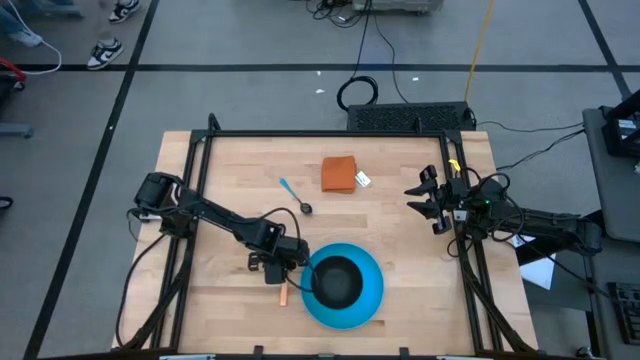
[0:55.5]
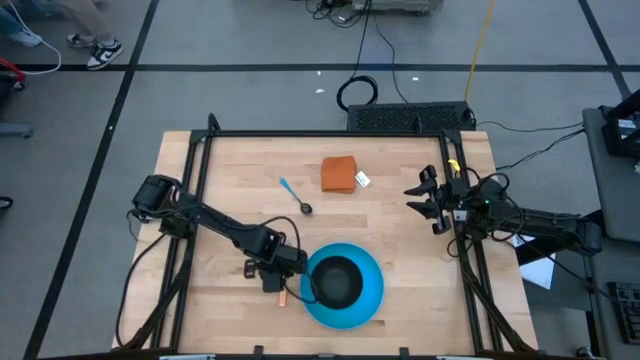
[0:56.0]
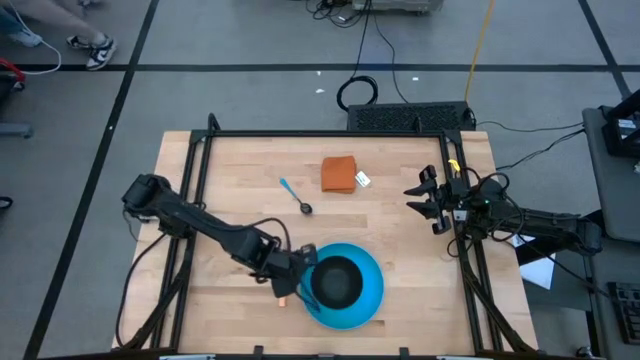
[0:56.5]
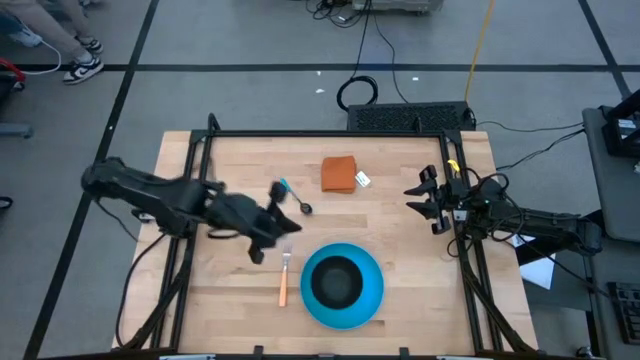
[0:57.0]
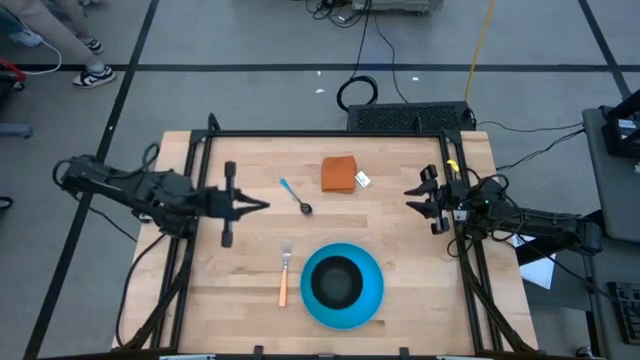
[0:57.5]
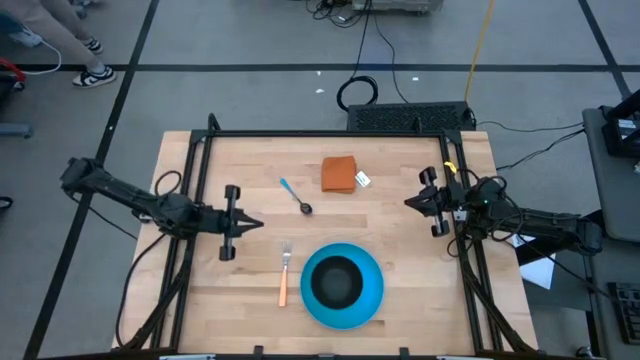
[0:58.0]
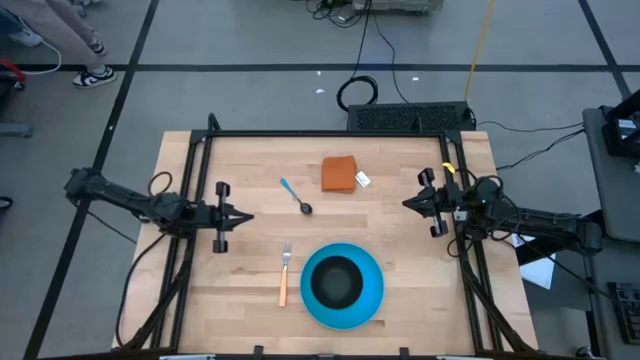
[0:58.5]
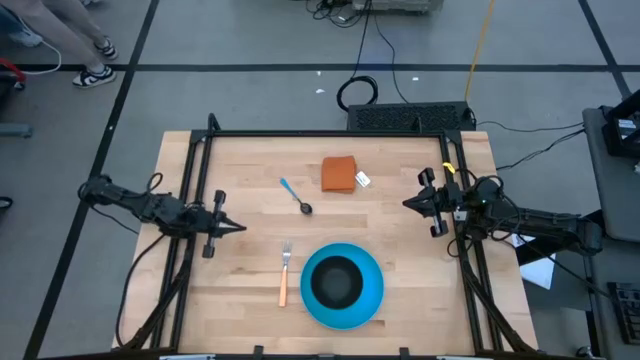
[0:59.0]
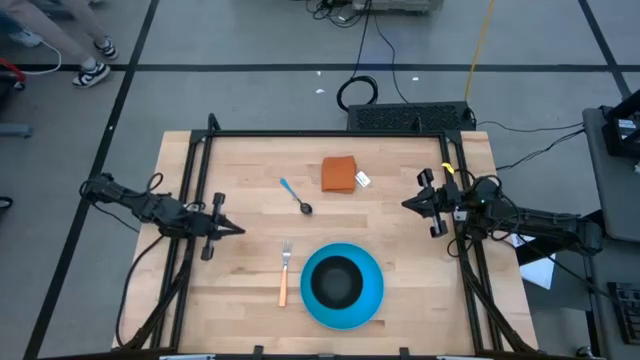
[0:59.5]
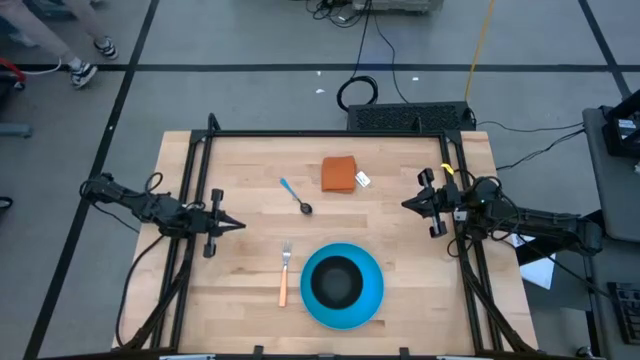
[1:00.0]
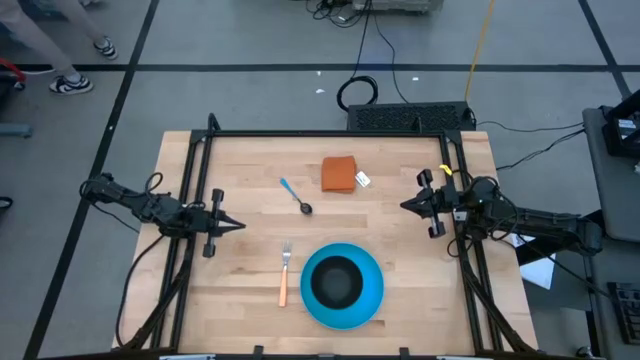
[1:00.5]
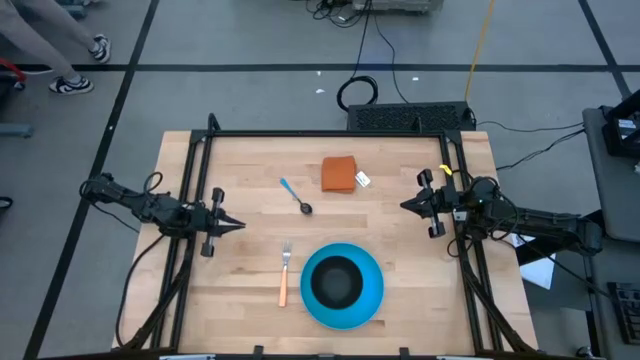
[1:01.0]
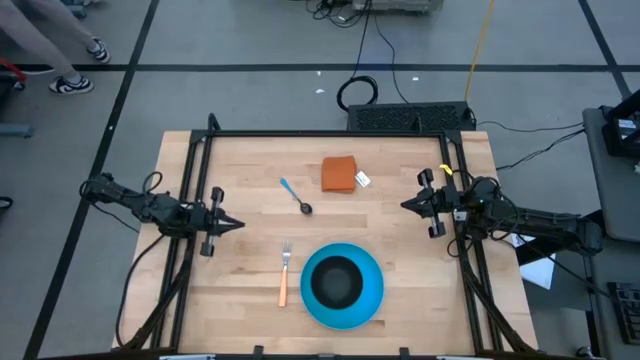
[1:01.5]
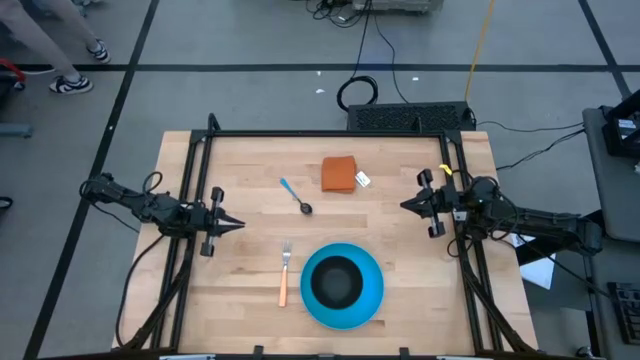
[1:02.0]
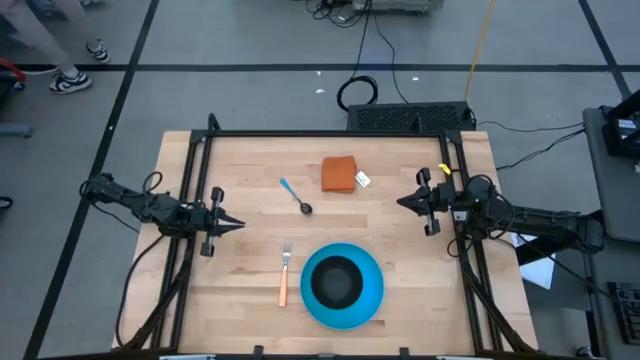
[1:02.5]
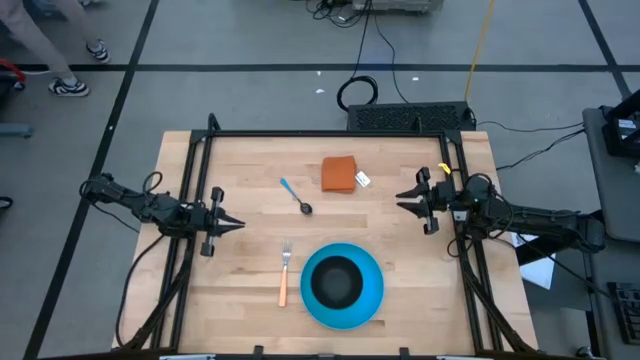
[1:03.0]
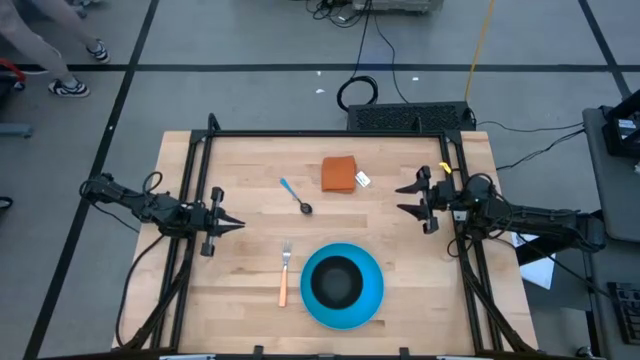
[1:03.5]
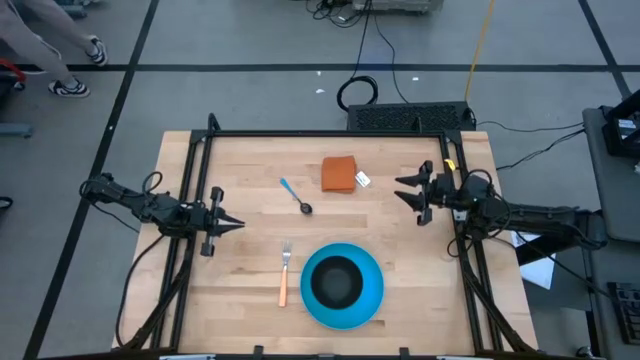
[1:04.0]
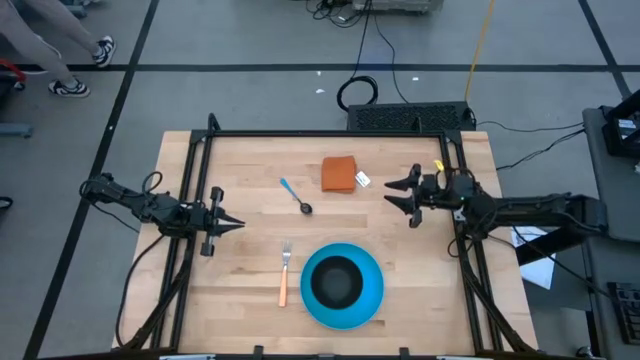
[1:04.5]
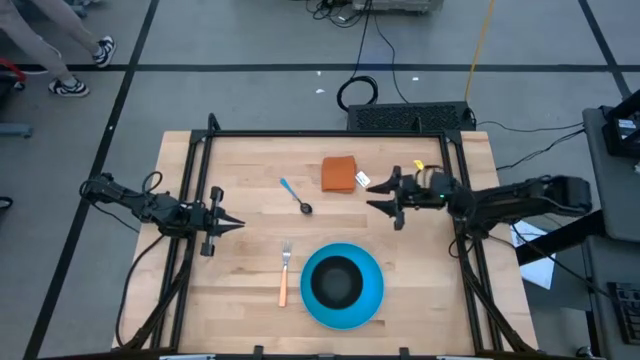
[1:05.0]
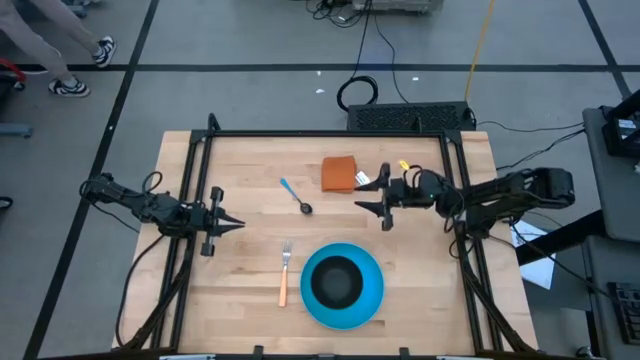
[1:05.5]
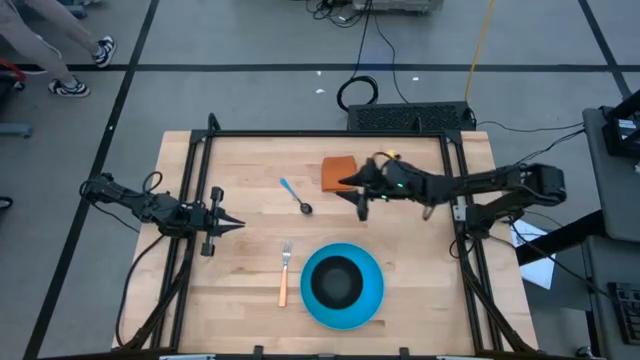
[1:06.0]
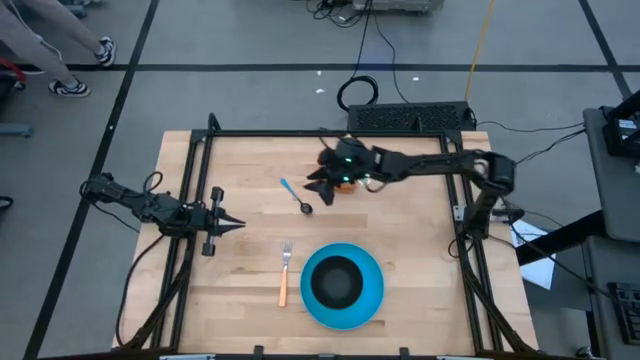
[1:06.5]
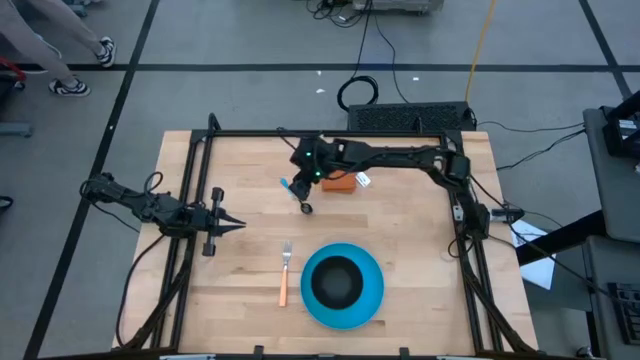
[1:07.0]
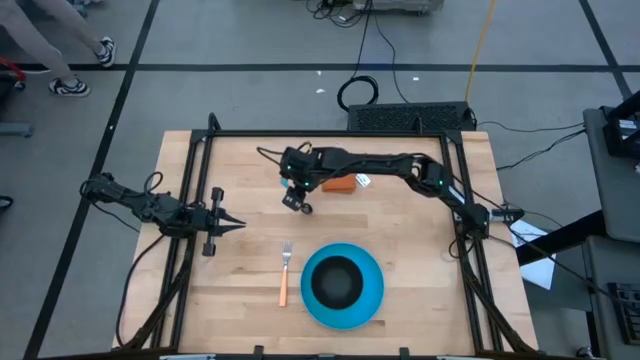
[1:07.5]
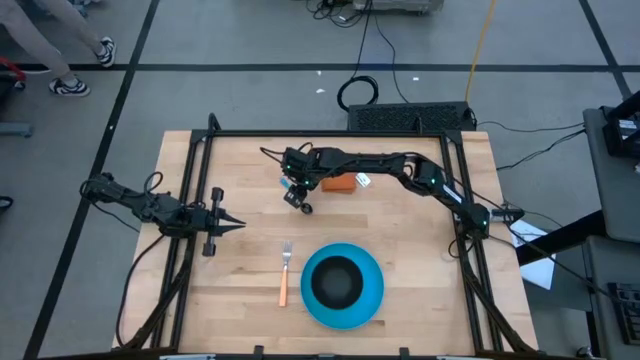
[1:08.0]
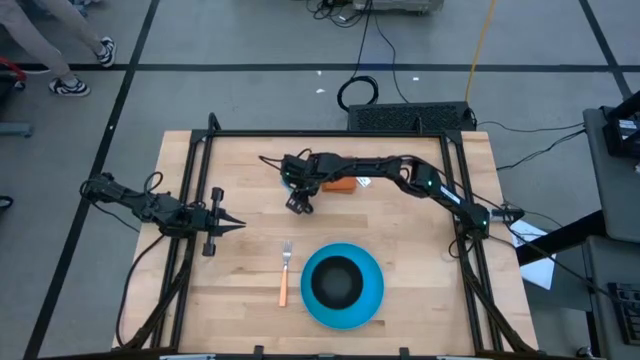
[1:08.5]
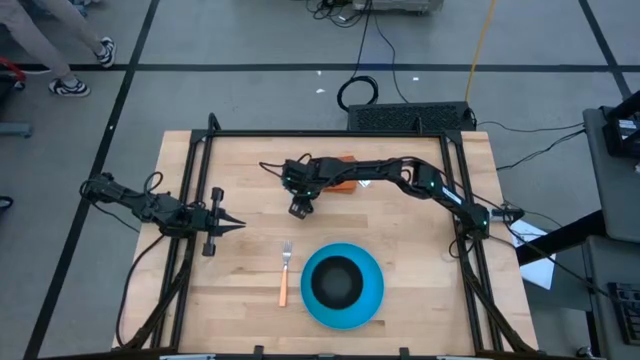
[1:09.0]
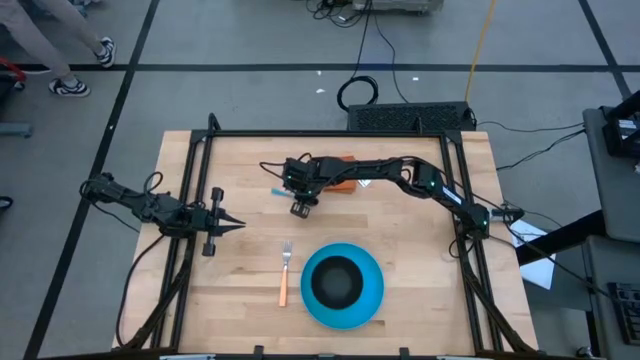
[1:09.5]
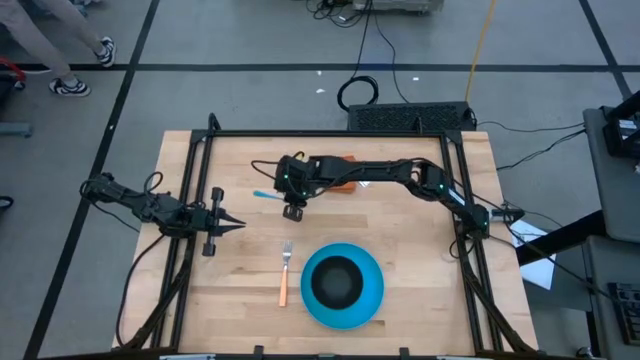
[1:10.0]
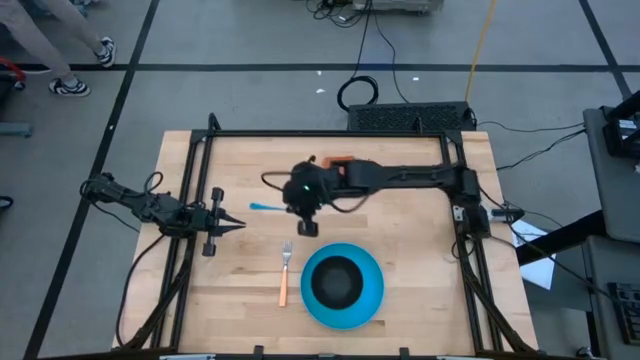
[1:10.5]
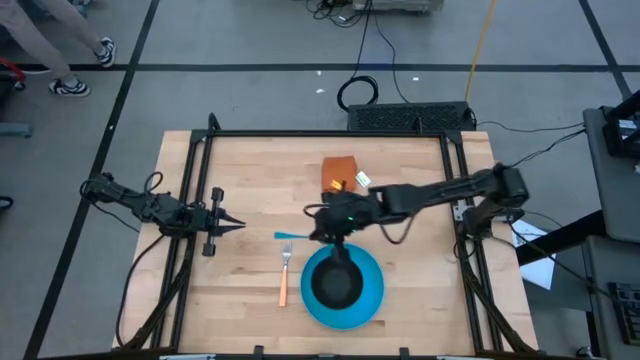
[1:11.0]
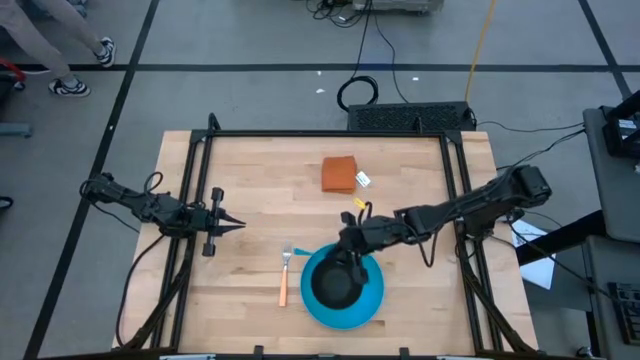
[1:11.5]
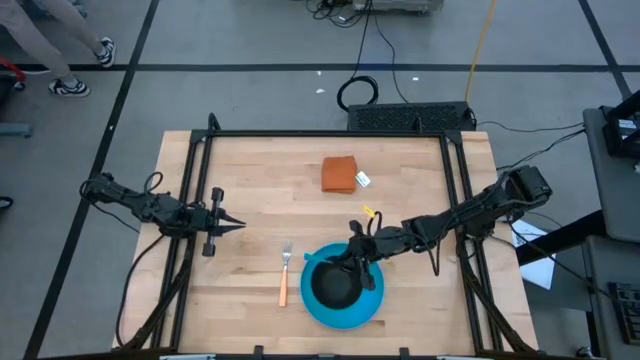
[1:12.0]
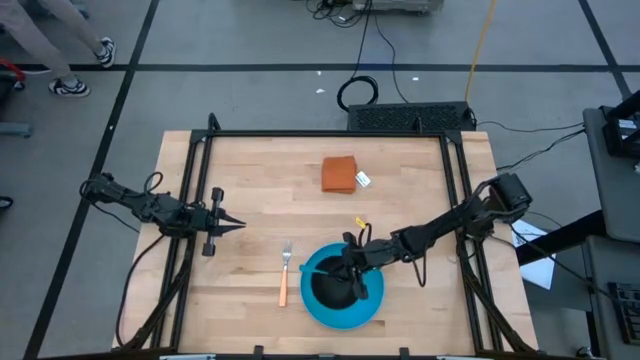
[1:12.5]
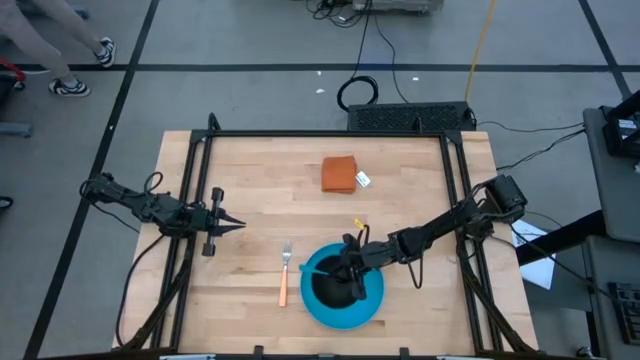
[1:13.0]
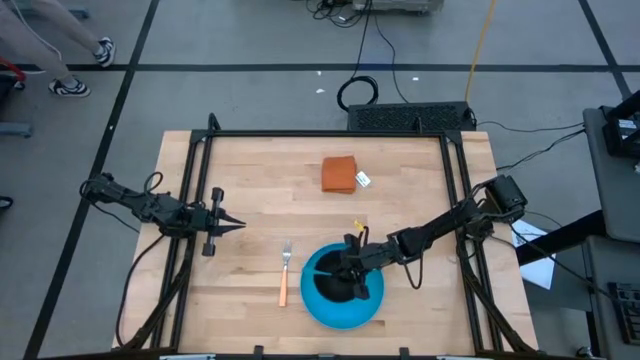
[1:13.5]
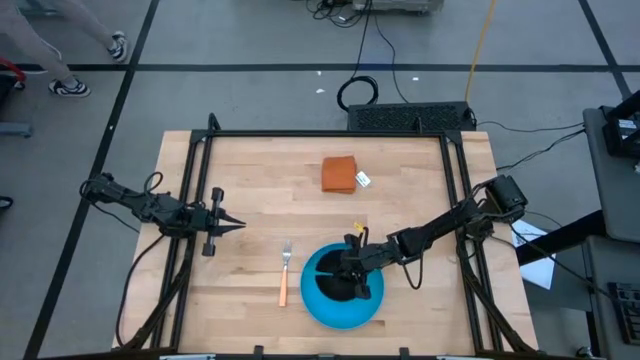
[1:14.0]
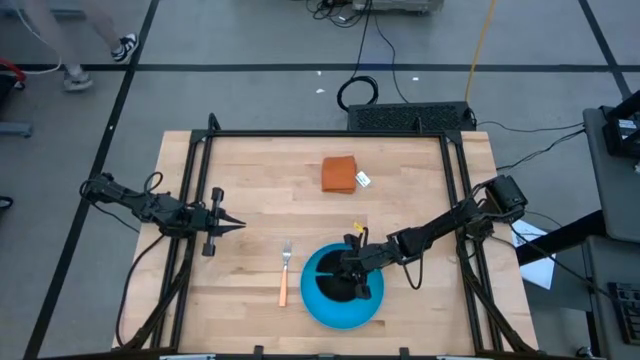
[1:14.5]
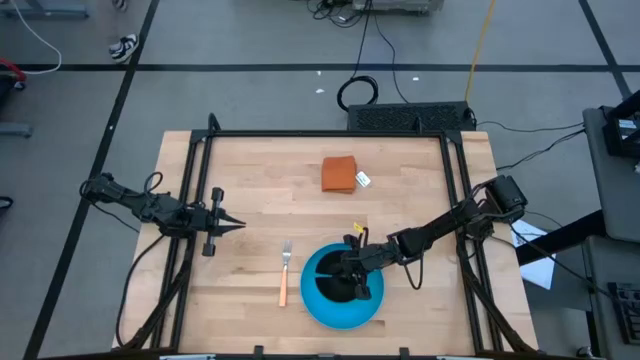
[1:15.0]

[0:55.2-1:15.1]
Task: Set table place
Put the blue spoon into the black bowl on the blue plate
